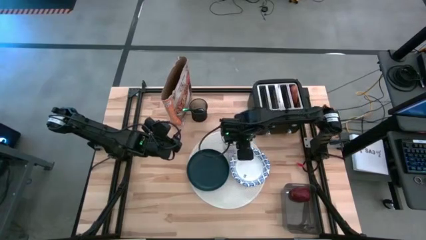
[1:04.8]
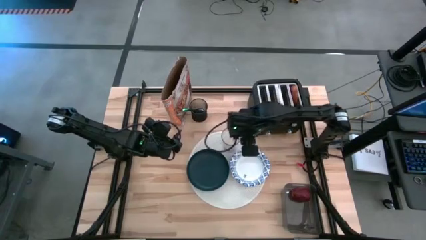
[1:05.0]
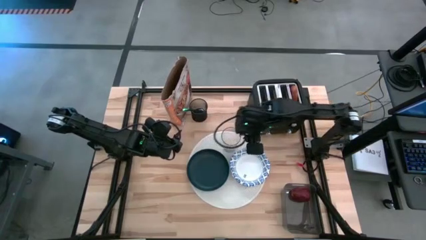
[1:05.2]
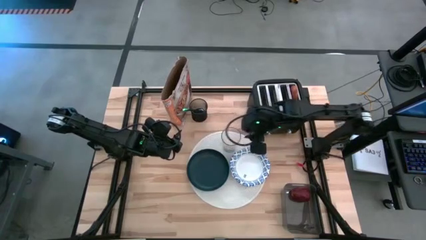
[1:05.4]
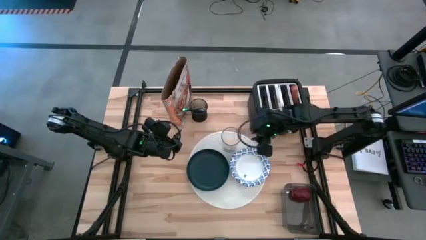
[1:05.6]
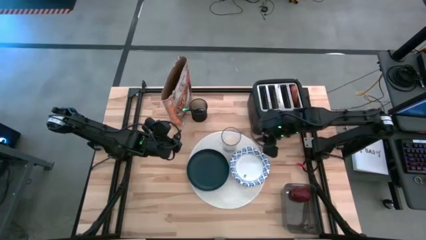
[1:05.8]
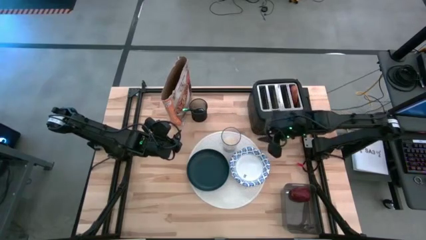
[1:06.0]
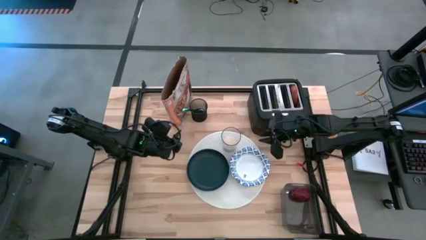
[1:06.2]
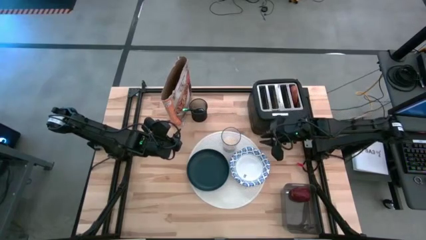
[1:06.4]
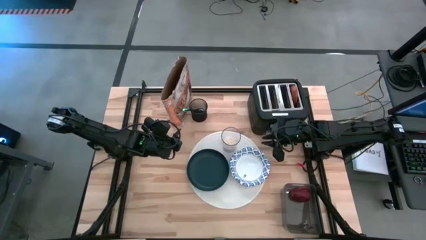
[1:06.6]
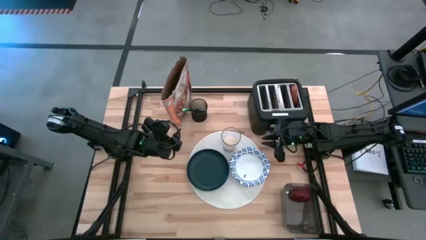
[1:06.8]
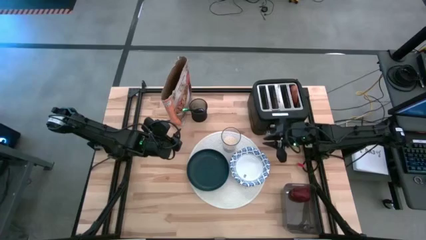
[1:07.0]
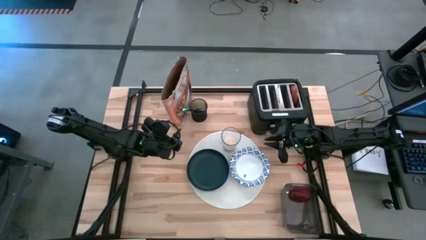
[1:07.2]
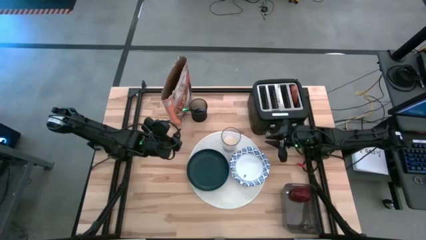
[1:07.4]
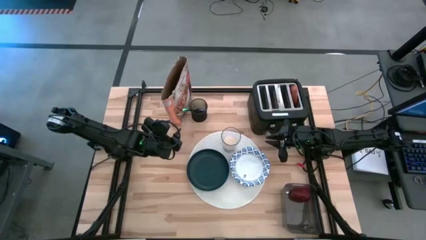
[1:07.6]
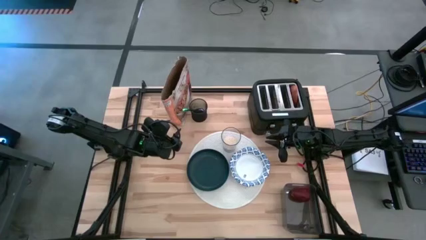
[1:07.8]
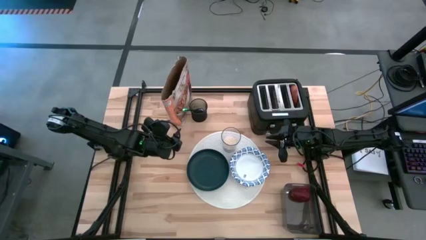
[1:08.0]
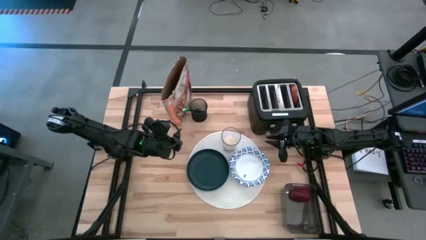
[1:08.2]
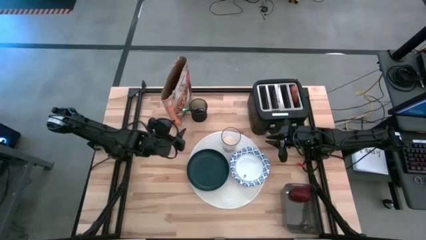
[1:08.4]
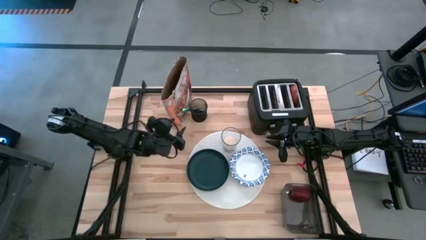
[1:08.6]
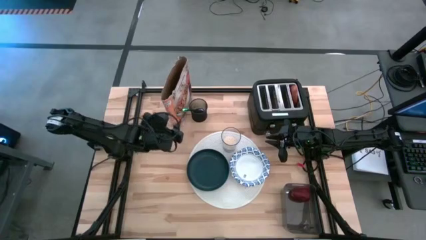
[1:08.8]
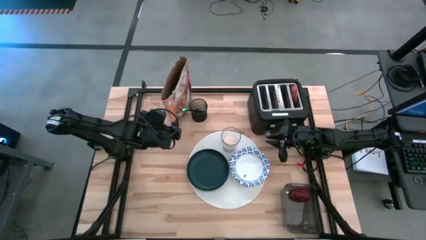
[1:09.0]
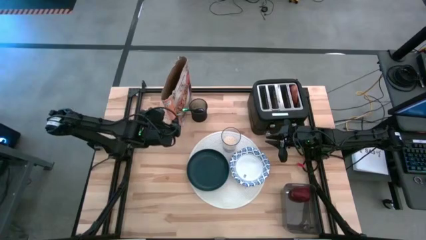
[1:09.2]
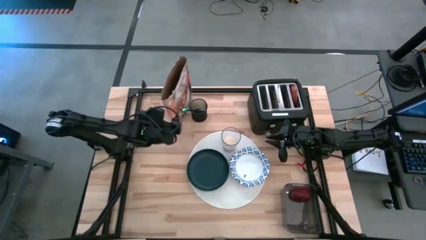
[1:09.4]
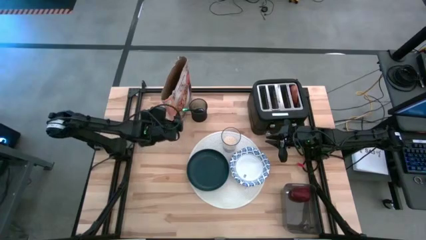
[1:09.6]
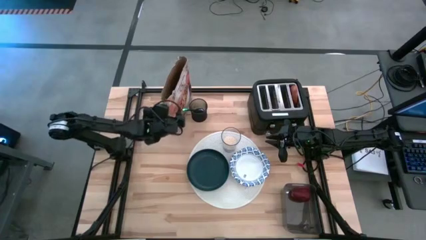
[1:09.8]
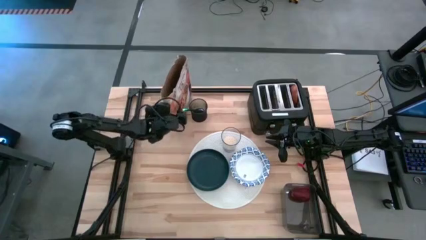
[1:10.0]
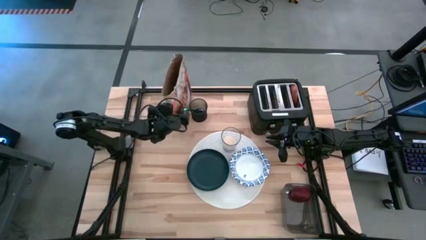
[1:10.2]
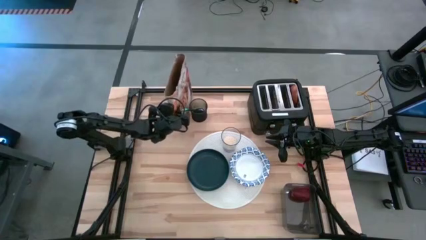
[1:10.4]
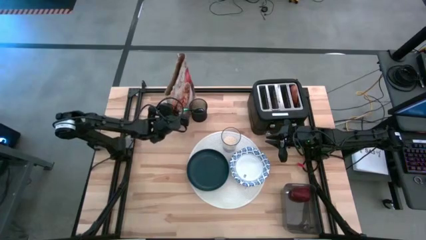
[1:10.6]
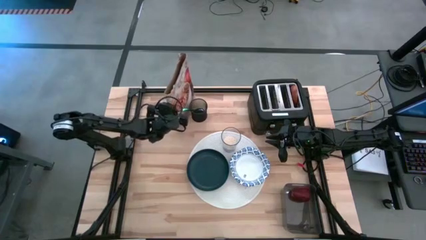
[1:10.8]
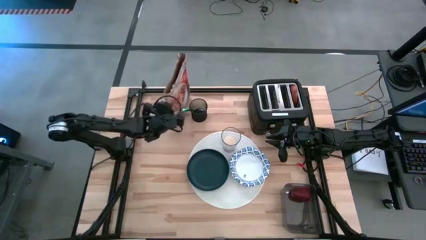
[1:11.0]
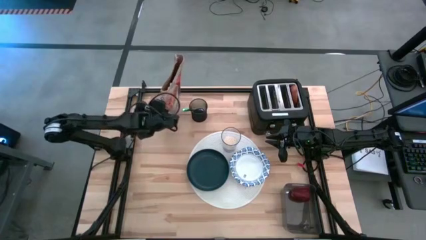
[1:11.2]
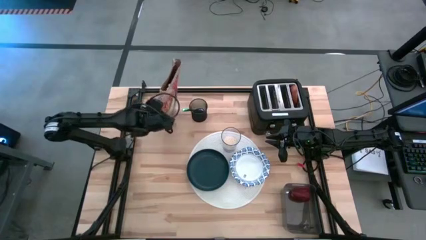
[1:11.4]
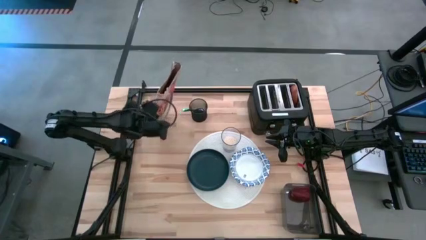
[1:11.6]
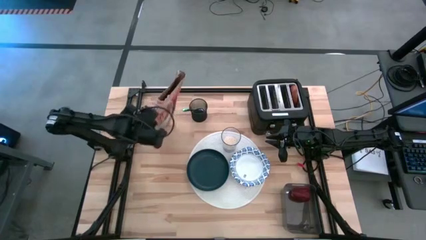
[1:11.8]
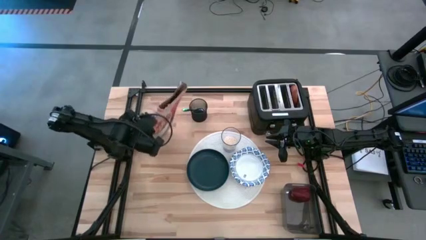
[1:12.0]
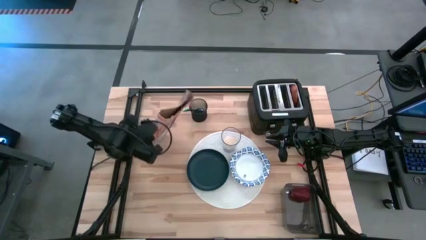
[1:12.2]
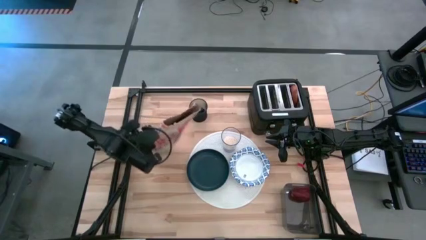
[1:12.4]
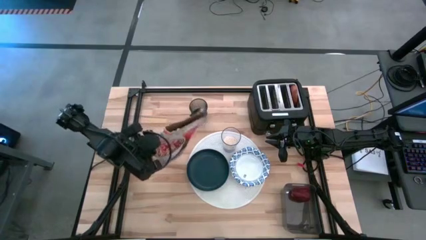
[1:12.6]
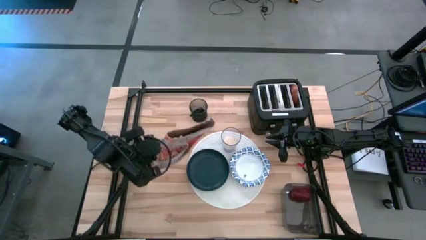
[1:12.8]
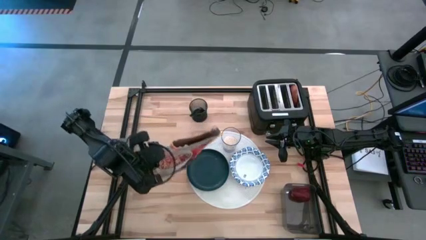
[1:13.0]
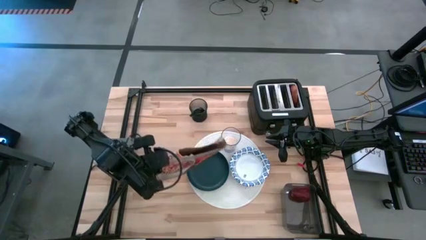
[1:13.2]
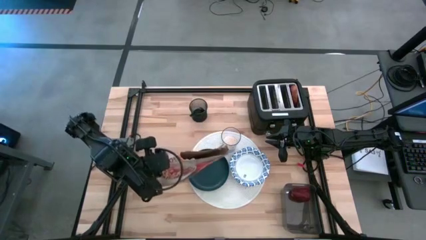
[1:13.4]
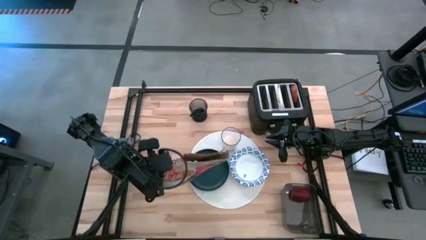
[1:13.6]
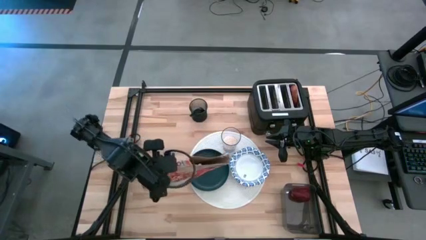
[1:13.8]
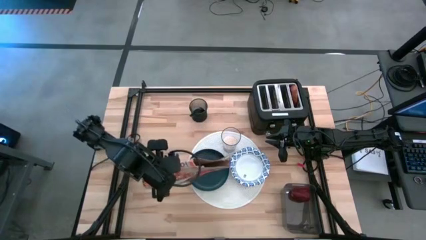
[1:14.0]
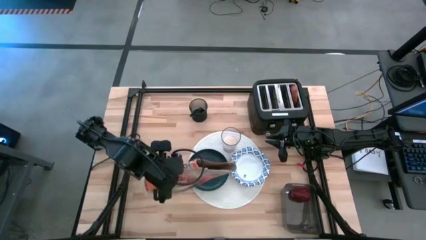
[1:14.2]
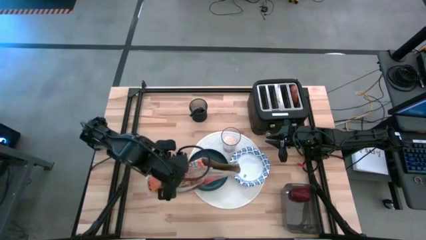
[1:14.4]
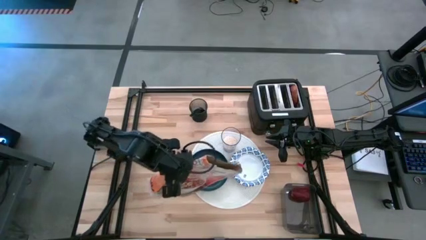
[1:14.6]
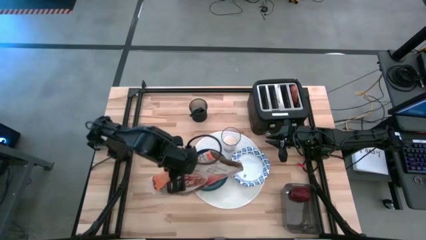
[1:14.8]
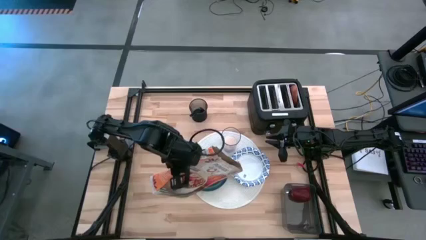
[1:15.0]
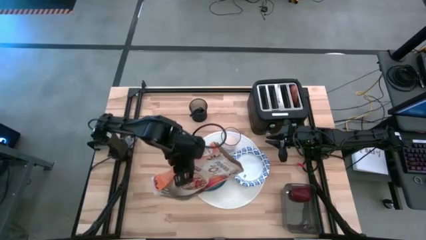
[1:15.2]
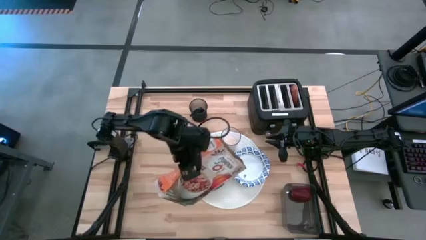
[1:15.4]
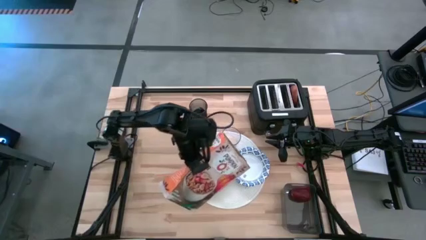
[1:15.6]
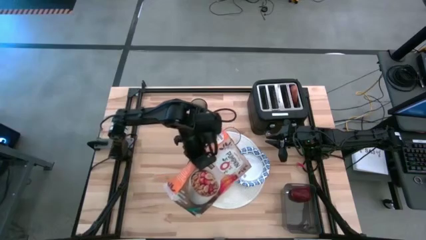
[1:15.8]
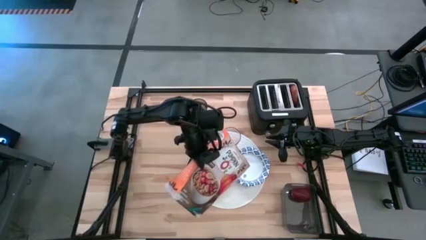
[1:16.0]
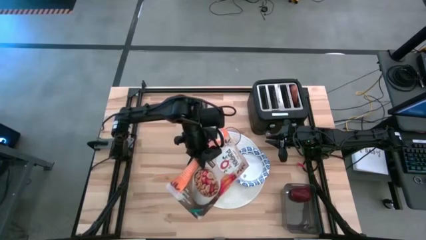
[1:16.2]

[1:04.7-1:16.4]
Task: Arrange a breakfast setting
Pour the cereal from the cereal box into the white patterned bowl

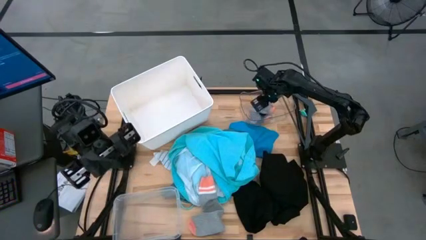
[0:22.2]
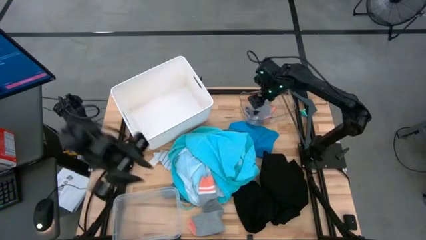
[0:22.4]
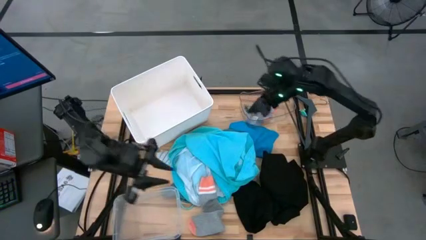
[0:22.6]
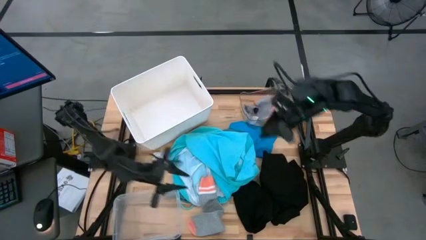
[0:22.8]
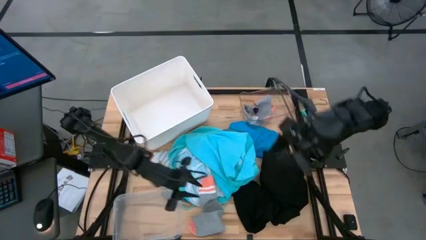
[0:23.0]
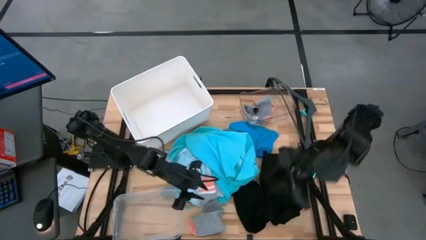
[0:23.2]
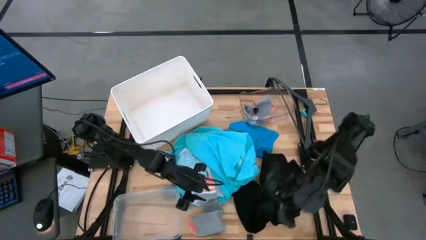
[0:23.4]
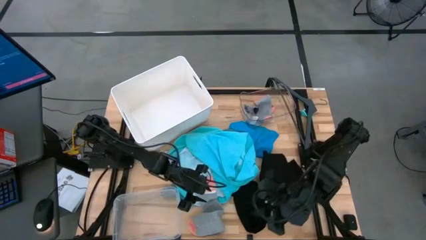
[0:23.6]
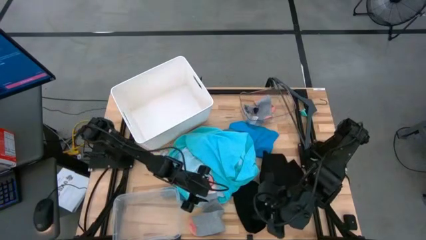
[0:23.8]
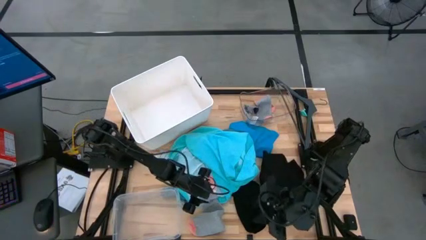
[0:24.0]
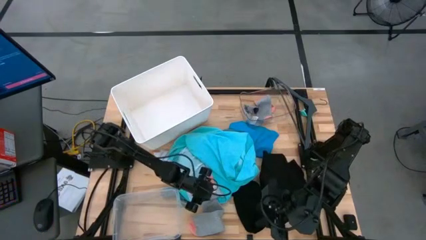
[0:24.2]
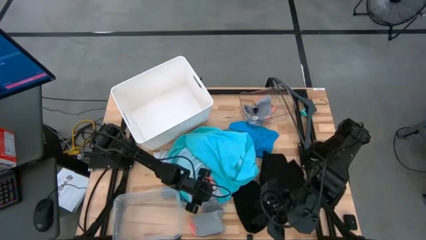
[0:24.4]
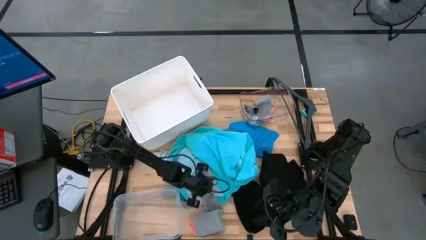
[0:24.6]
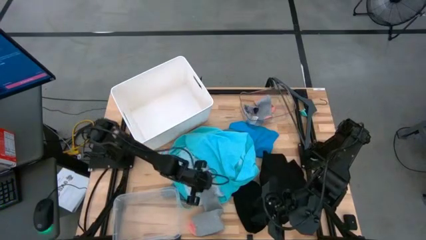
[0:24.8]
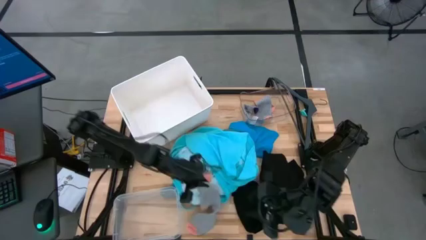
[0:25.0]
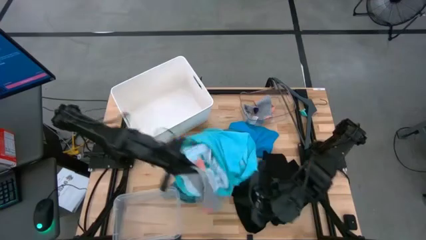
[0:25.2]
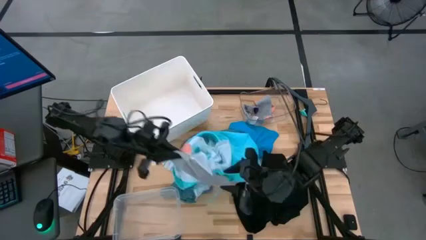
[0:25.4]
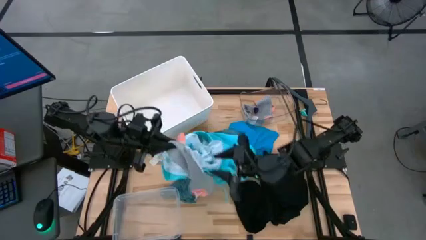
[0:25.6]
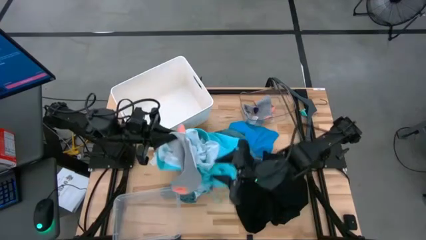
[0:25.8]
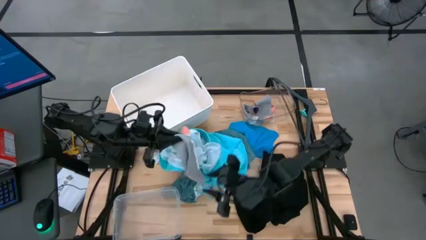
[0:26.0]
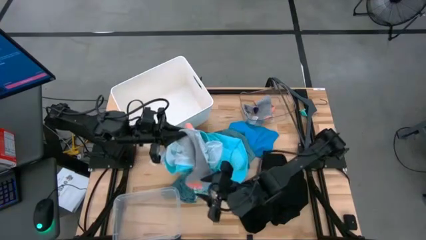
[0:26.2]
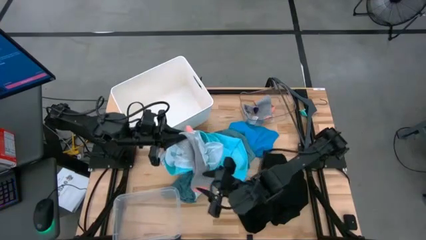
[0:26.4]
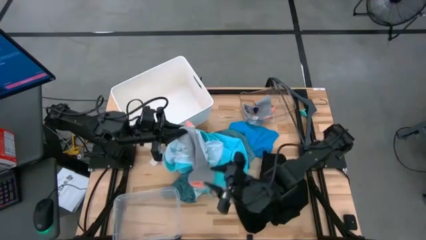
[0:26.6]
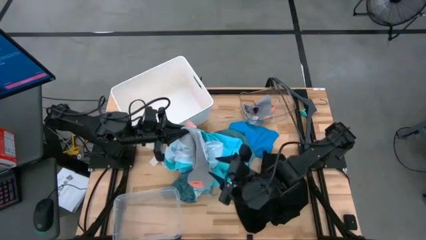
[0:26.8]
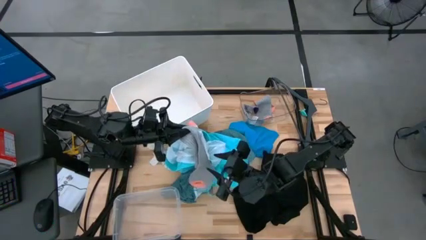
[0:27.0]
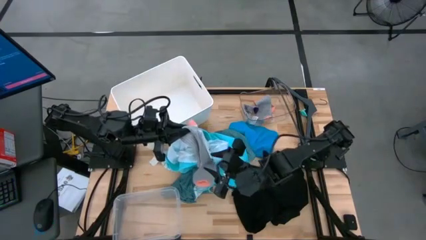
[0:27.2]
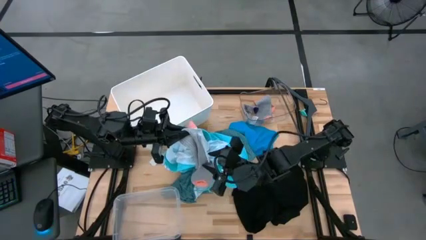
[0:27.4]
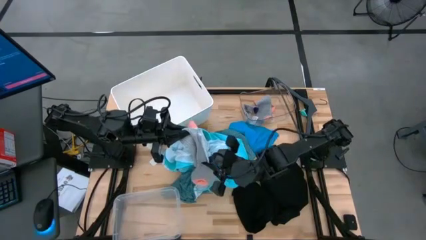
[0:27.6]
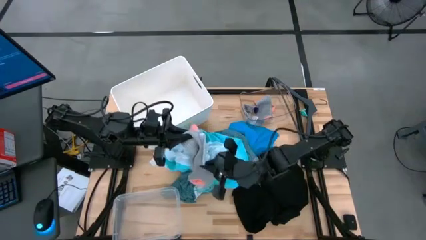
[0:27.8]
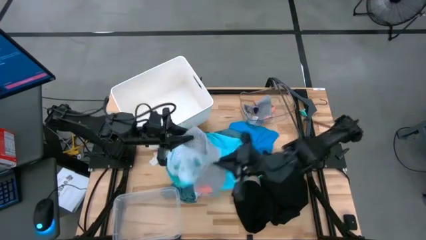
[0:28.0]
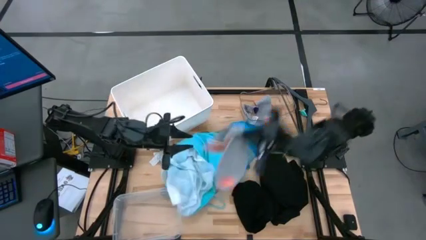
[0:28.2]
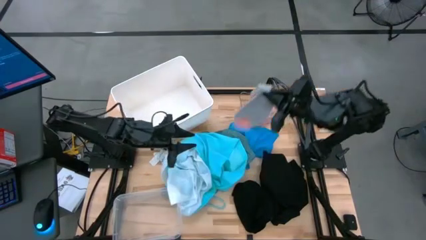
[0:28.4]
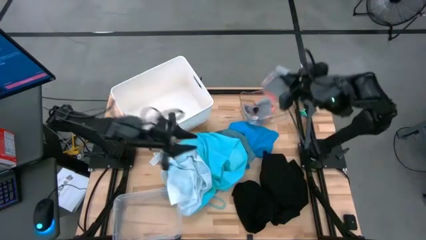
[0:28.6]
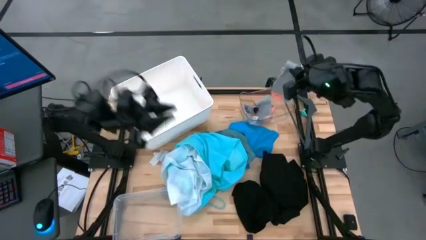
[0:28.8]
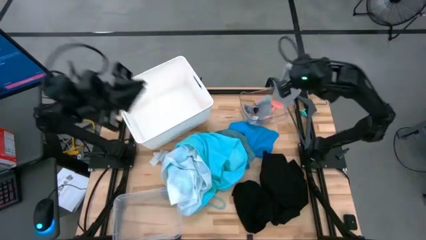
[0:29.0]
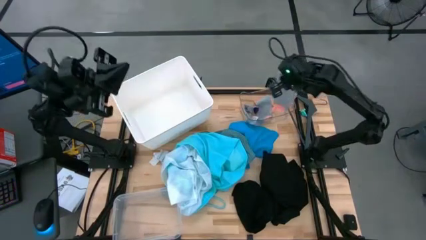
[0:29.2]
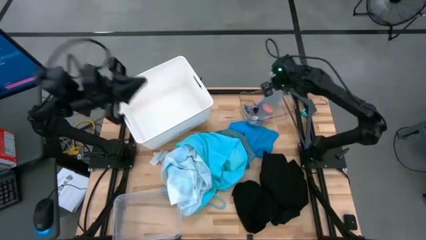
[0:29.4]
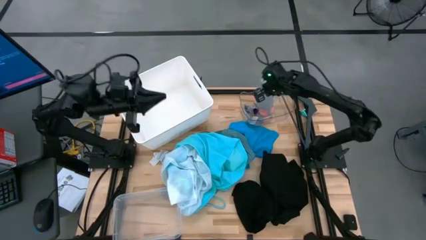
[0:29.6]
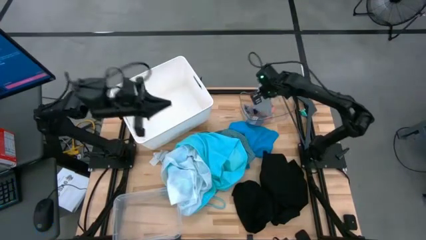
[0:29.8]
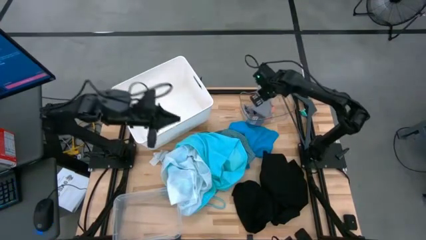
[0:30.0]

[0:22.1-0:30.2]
Task: Pick & Place Cloths
Put the gray and pink sock into the top transparent bin
